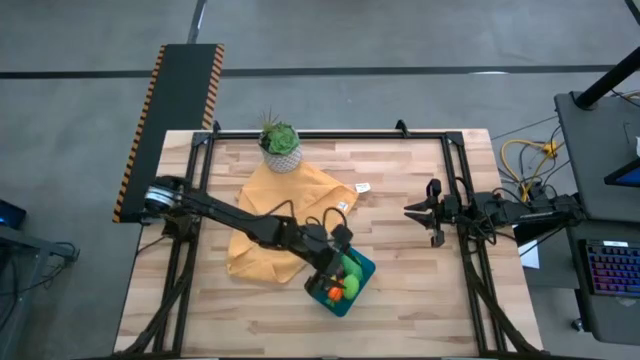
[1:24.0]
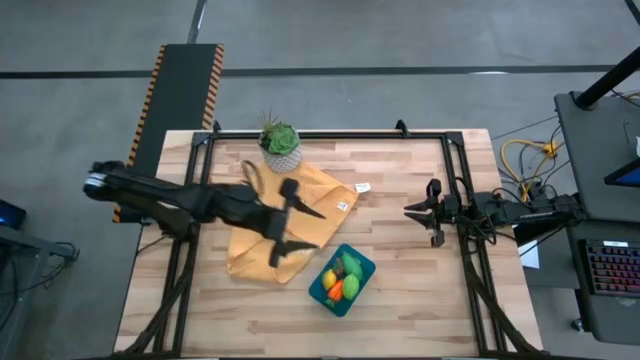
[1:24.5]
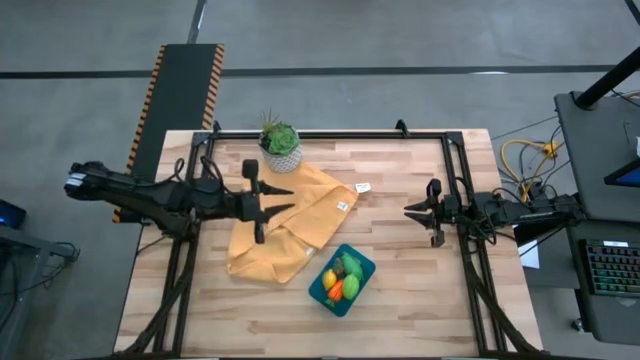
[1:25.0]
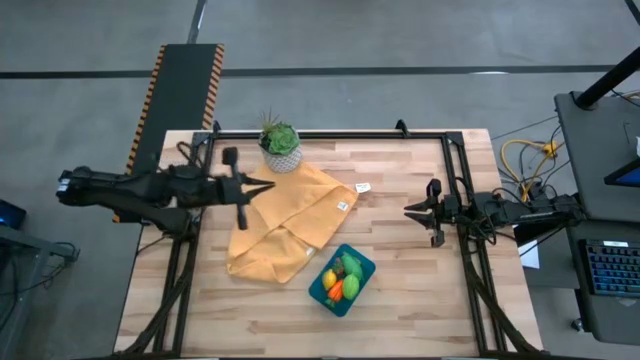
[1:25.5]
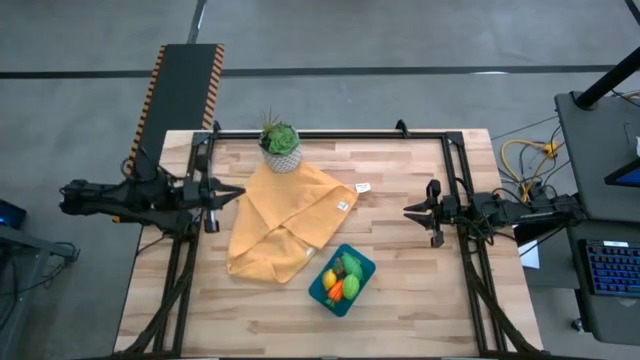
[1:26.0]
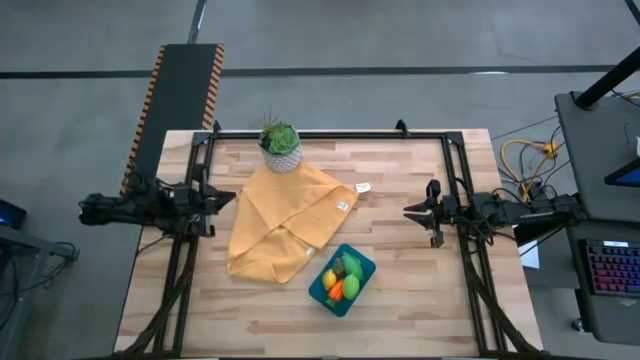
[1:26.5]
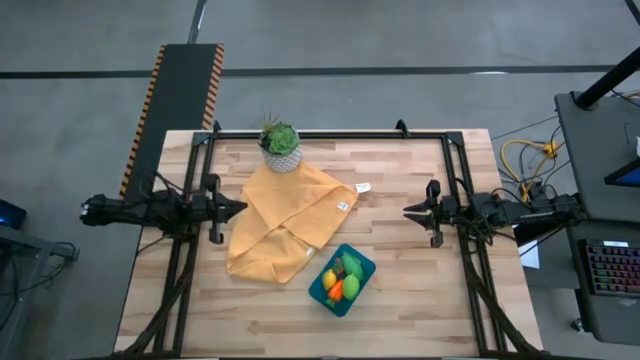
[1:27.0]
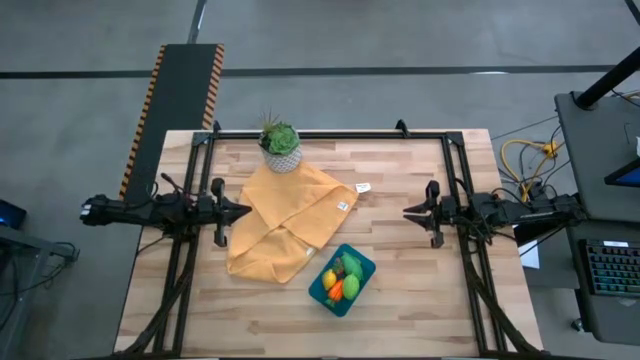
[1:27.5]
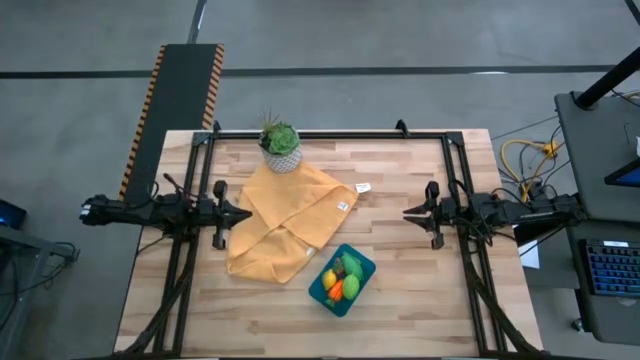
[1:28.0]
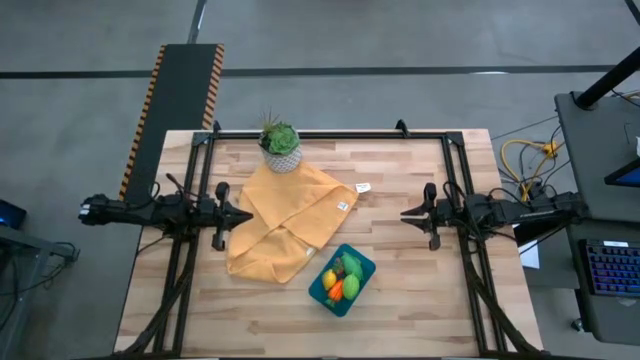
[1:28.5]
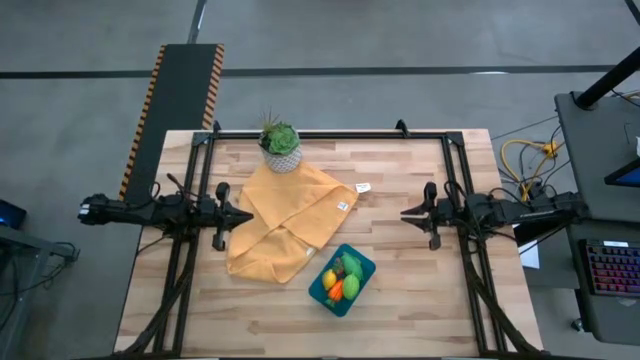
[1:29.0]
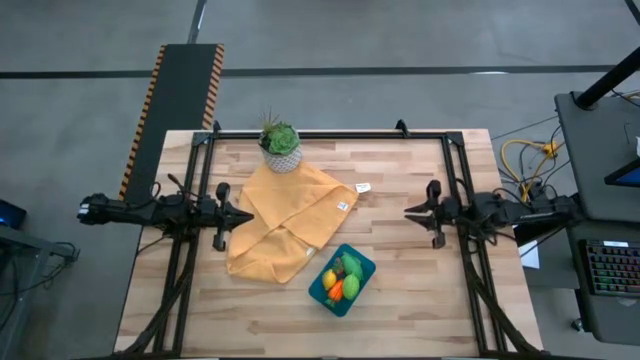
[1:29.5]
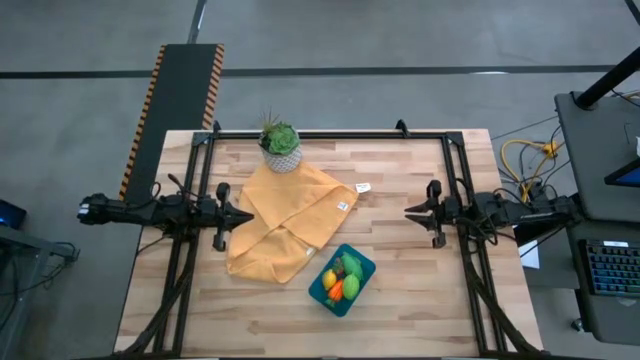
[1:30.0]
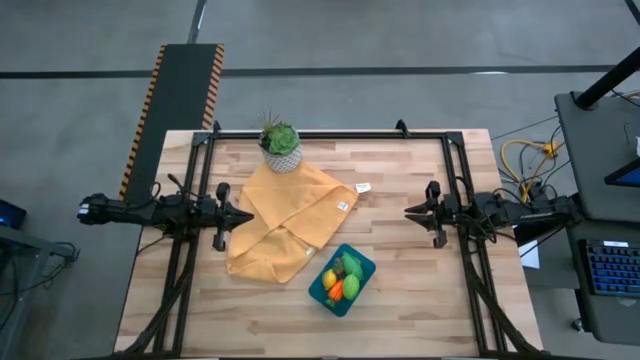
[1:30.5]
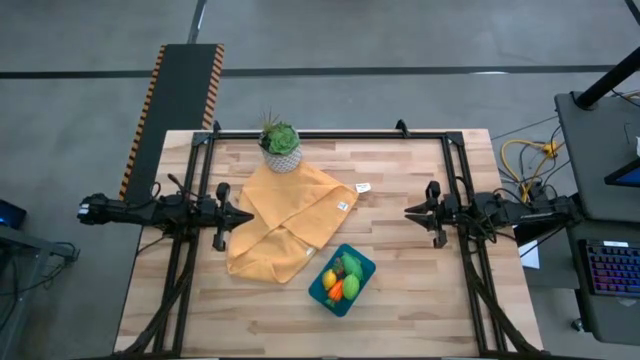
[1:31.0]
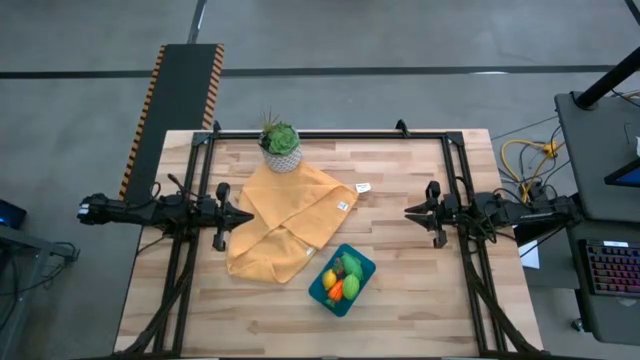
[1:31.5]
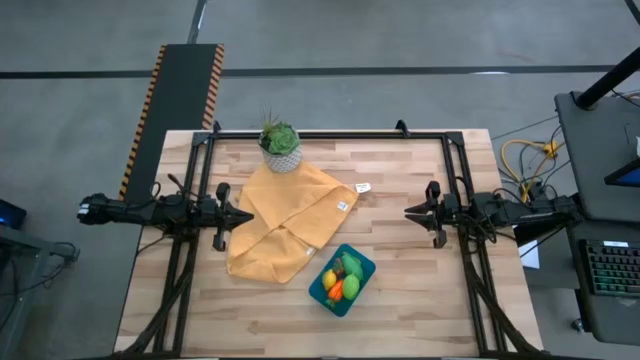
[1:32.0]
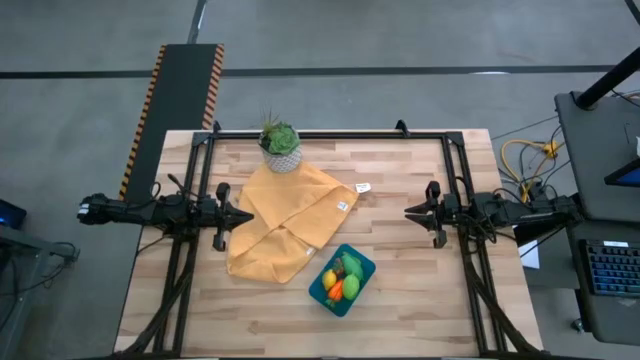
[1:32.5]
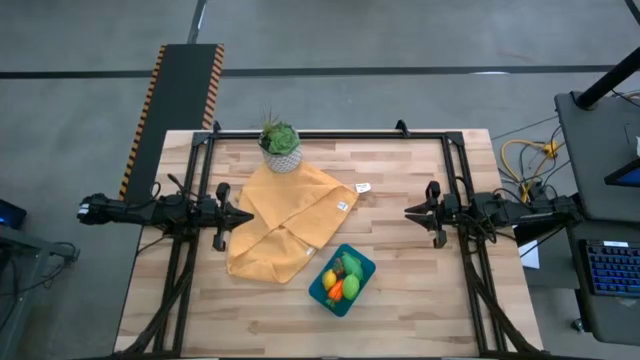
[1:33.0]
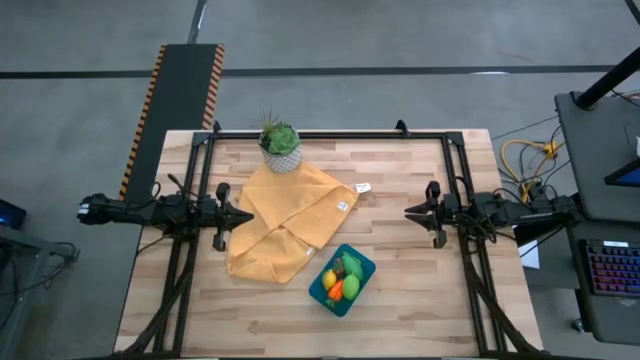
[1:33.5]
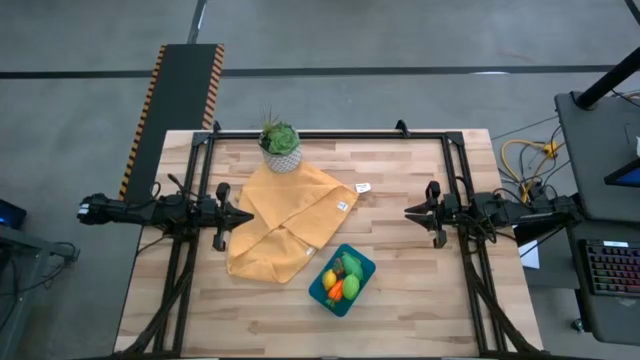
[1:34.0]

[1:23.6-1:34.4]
Task: Pick and placing Produce into tupperware
Return to Home Position

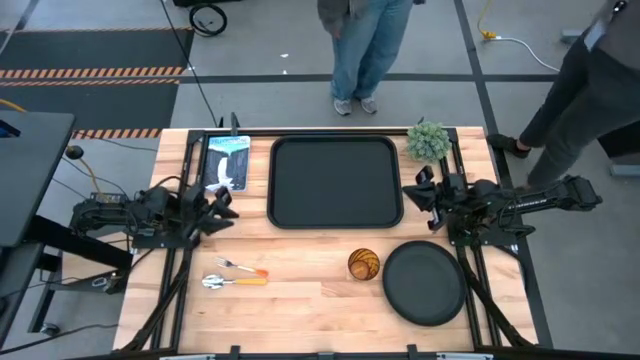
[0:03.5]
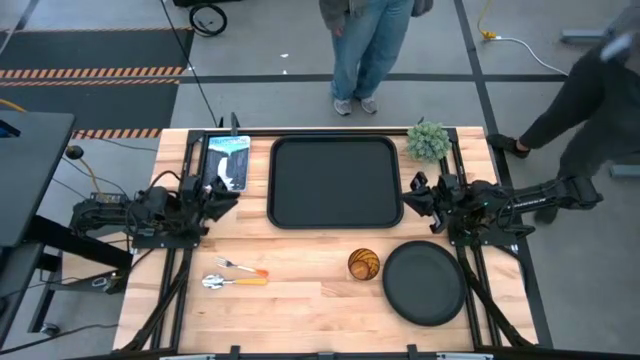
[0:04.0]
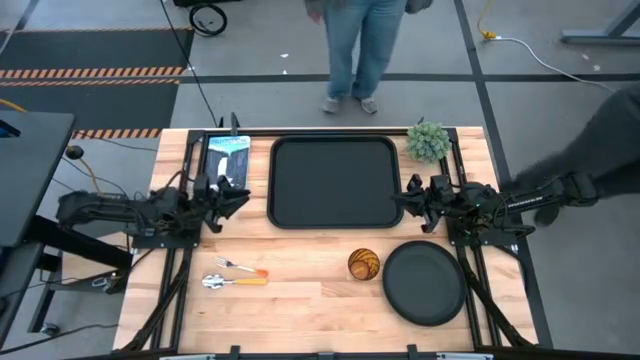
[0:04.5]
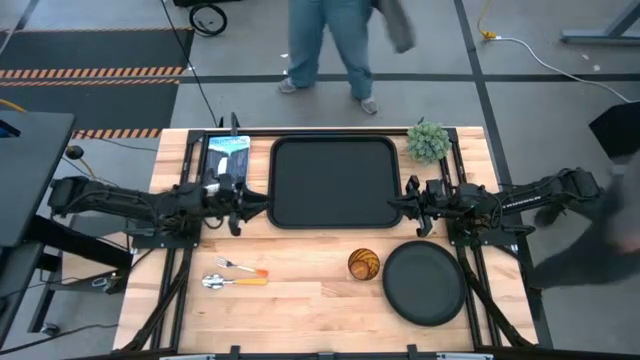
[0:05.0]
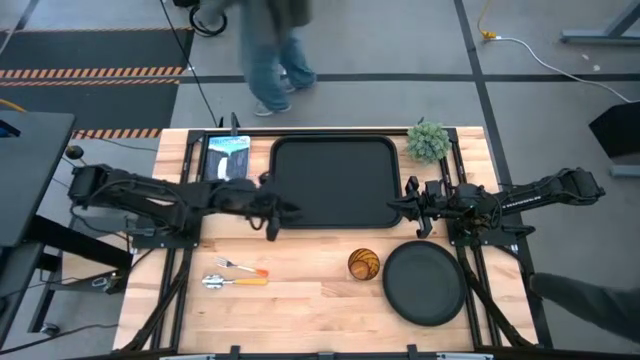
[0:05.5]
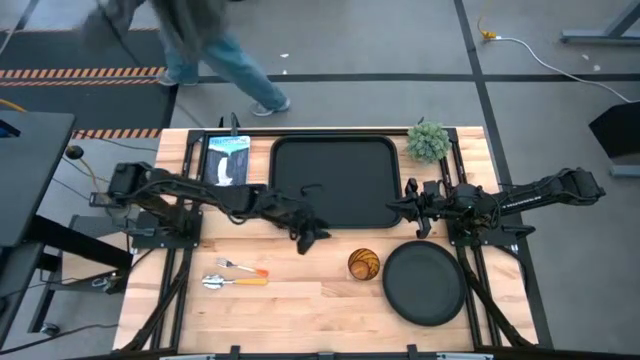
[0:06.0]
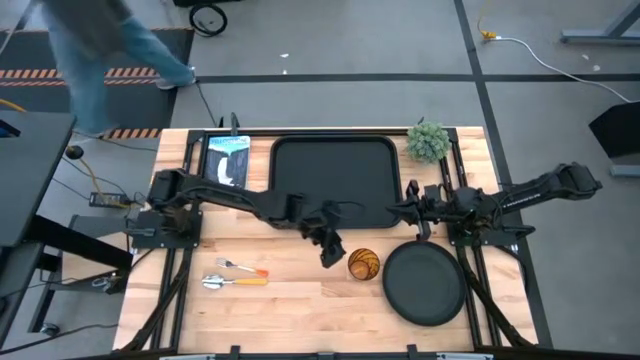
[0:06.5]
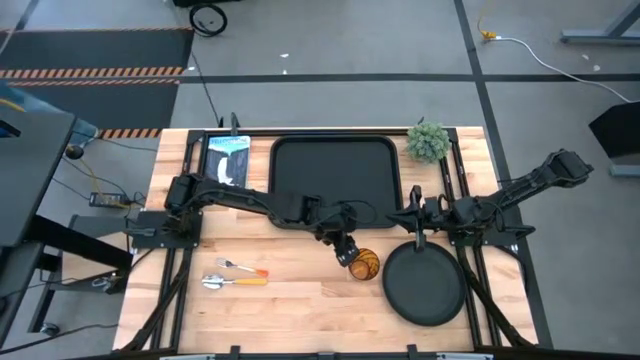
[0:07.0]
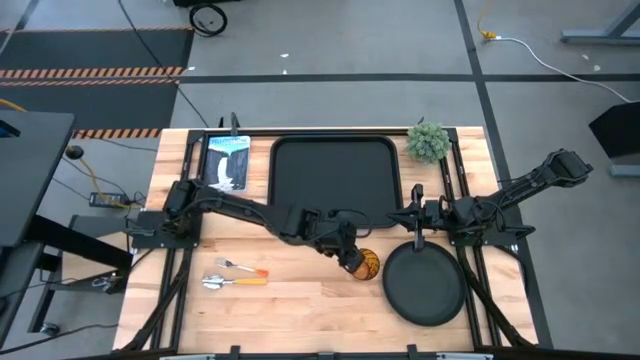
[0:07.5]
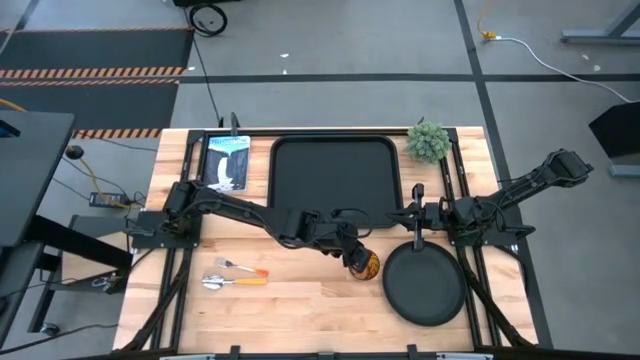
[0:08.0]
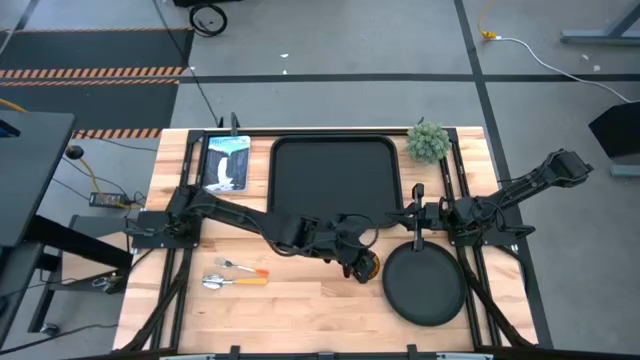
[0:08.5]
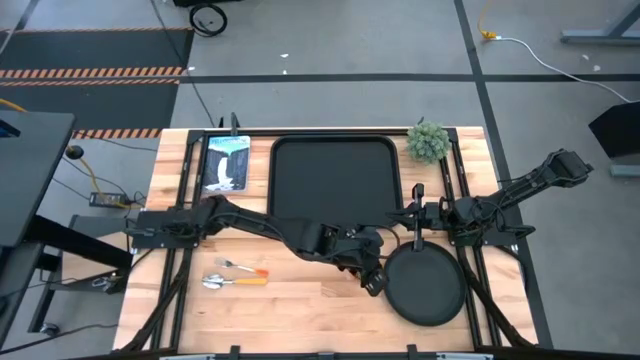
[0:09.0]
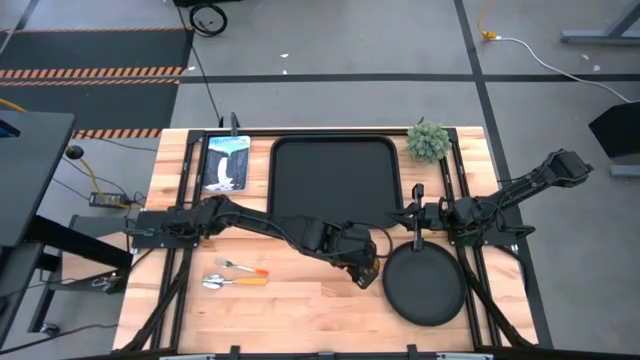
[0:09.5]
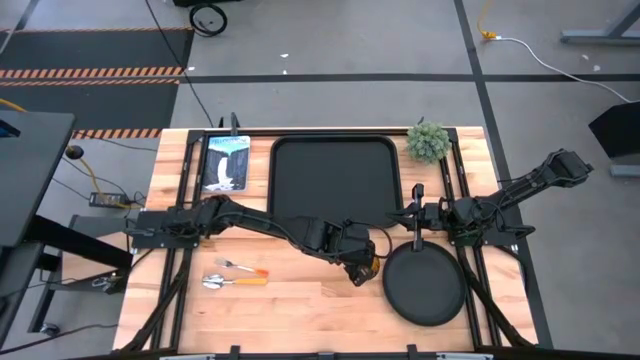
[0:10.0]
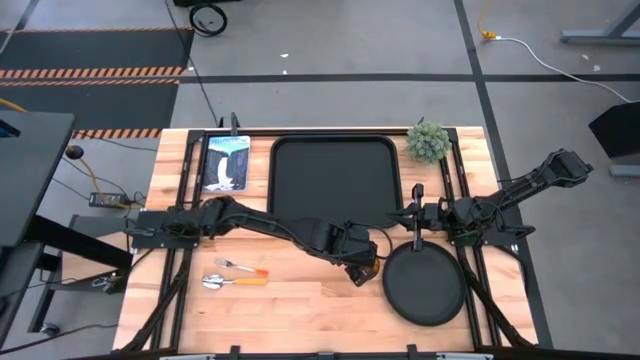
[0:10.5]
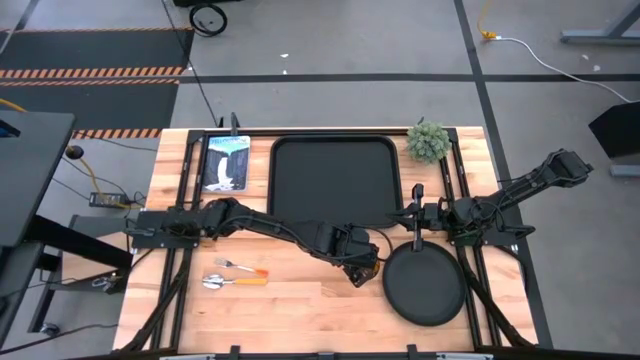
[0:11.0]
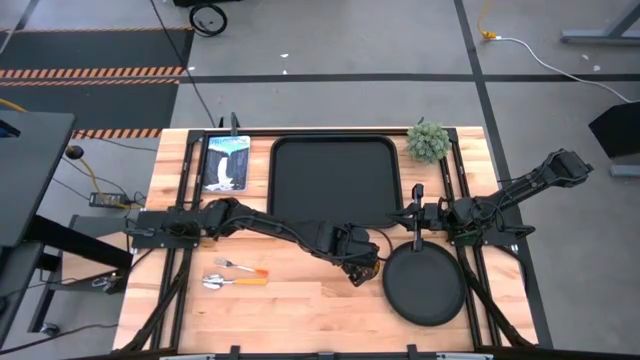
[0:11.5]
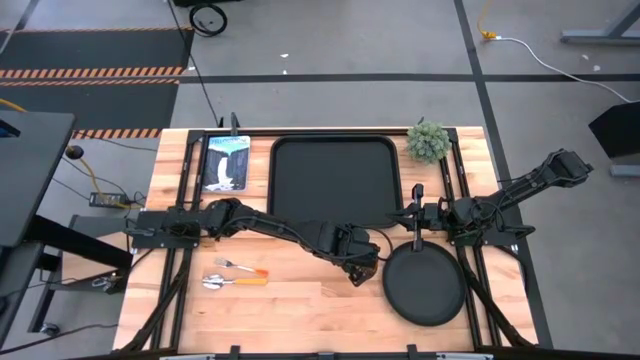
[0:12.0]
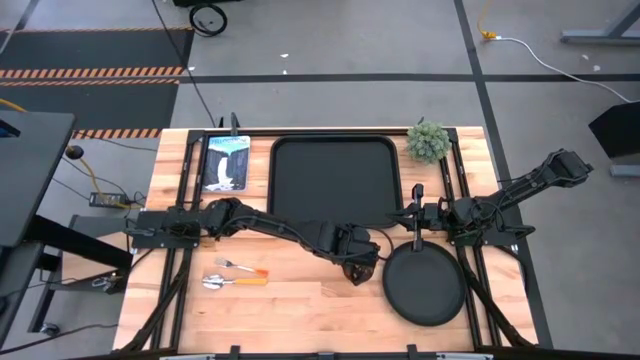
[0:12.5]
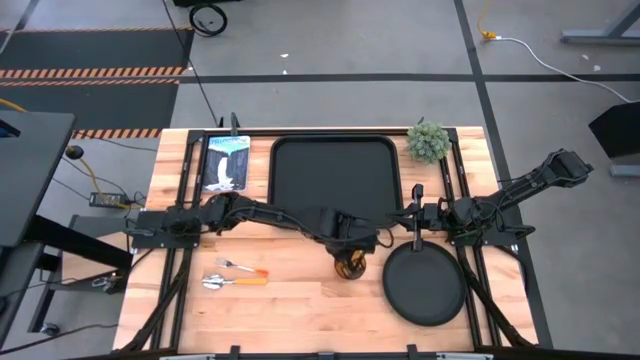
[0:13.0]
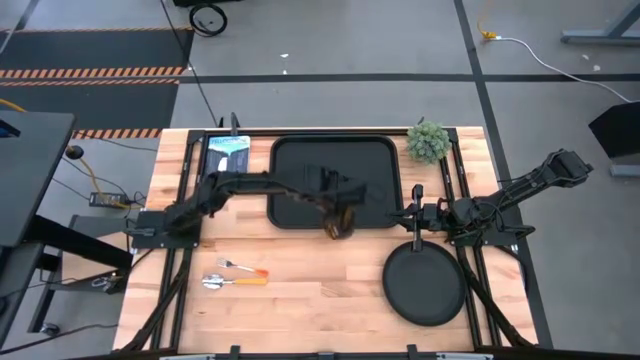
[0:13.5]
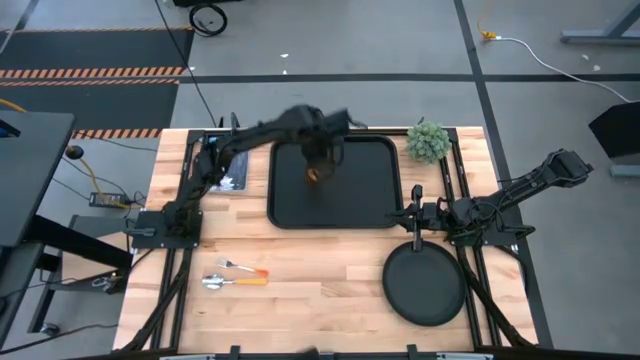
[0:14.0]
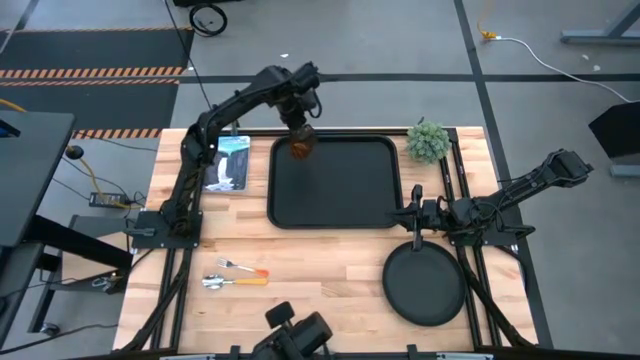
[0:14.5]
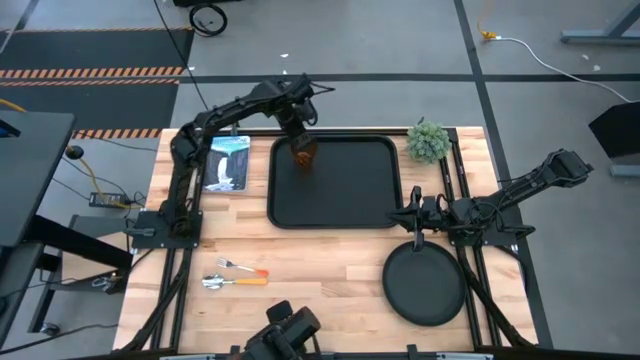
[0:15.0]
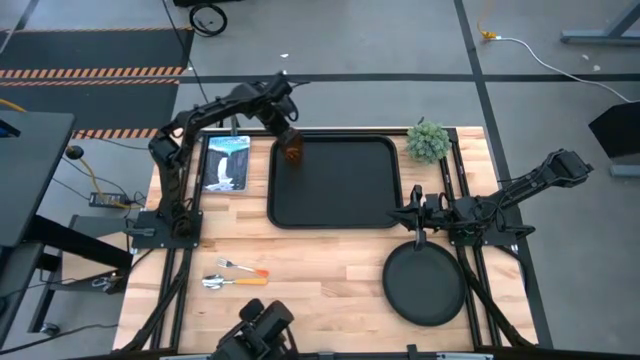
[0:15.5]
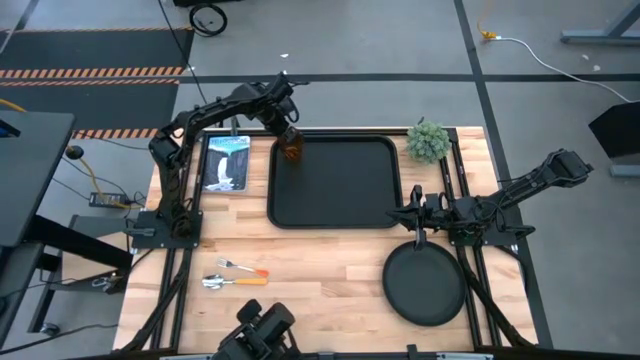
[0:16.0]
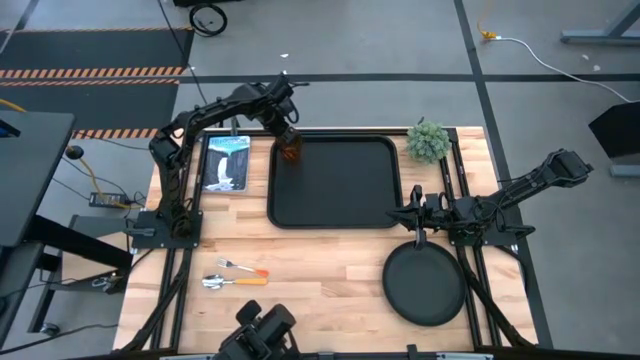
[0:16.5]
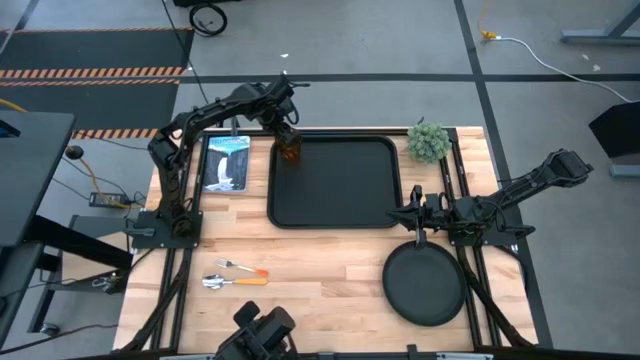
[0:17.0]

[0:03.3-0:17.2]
Task: Pick and place plate/cup/fork/spoon on tray
Put the orange glass on the top left of the black tray
